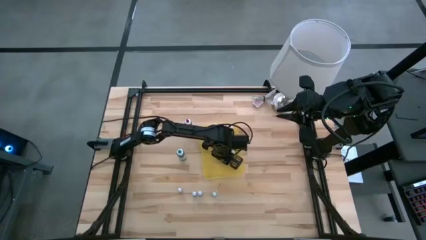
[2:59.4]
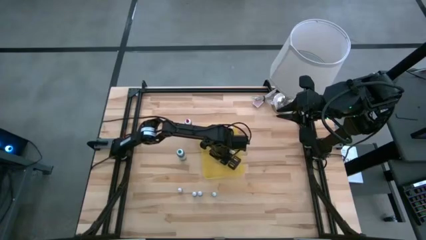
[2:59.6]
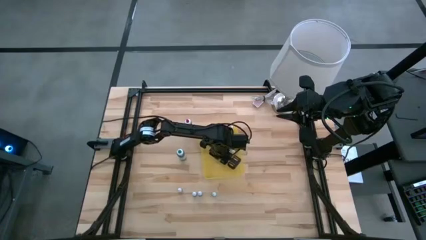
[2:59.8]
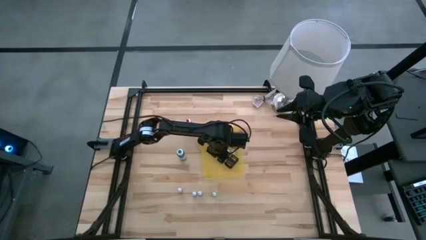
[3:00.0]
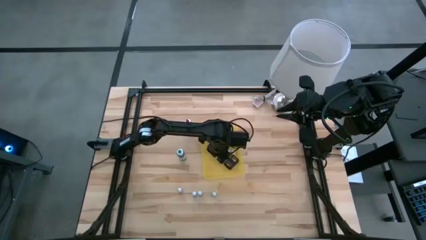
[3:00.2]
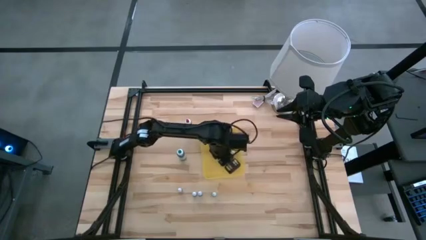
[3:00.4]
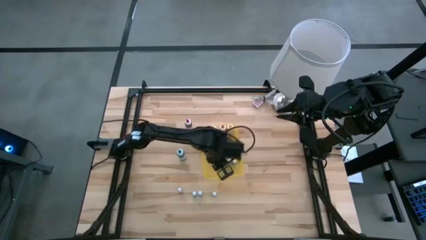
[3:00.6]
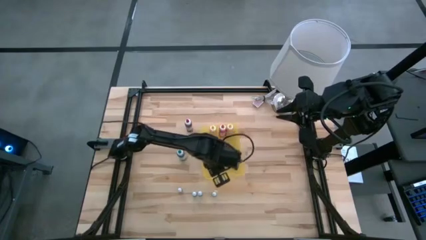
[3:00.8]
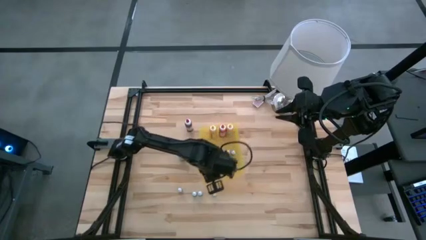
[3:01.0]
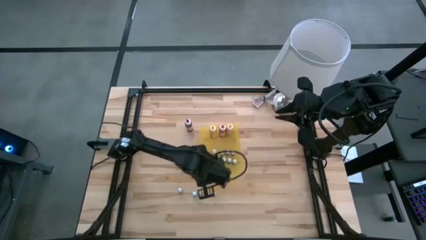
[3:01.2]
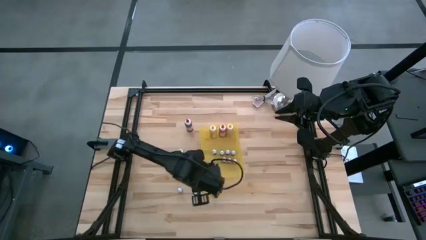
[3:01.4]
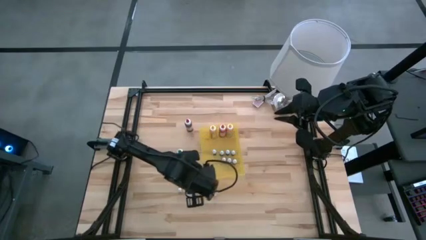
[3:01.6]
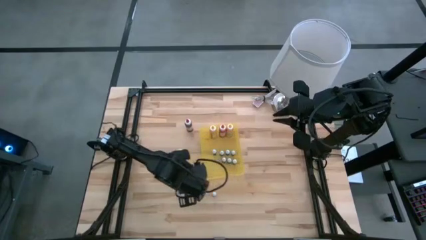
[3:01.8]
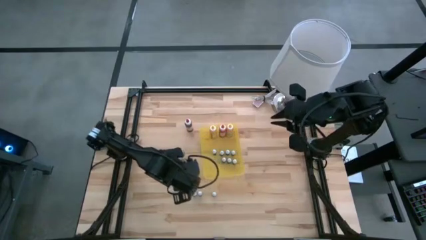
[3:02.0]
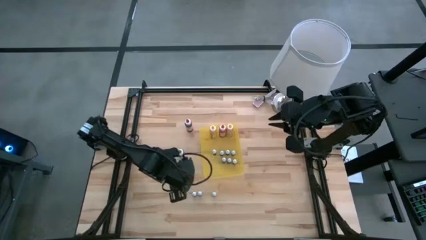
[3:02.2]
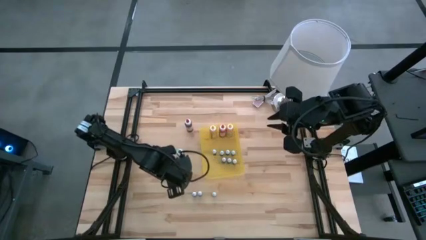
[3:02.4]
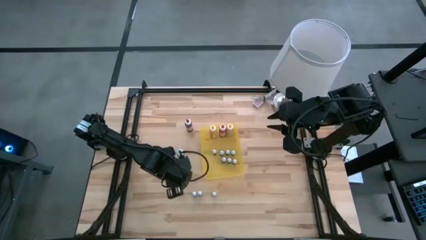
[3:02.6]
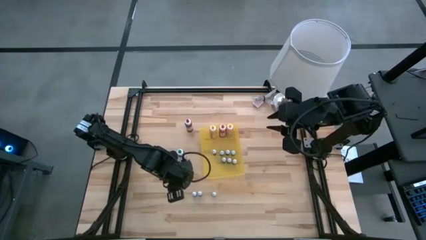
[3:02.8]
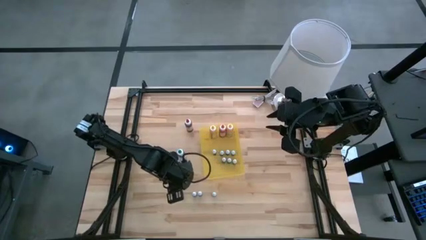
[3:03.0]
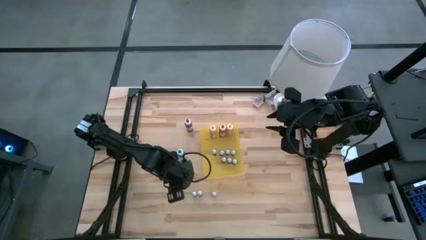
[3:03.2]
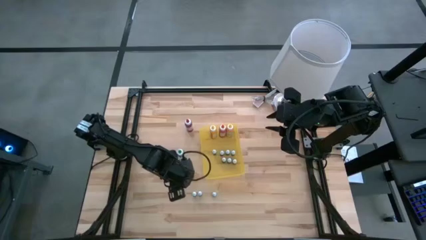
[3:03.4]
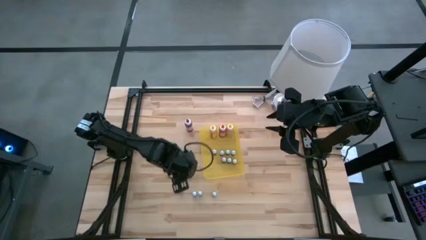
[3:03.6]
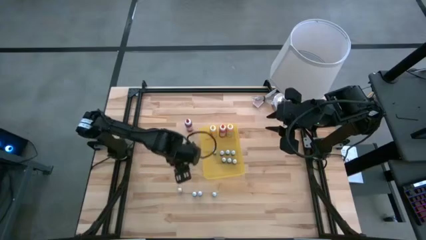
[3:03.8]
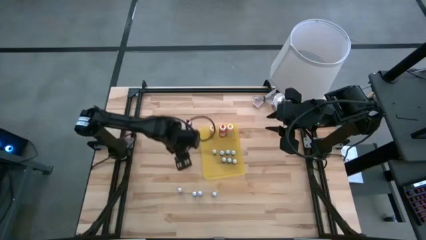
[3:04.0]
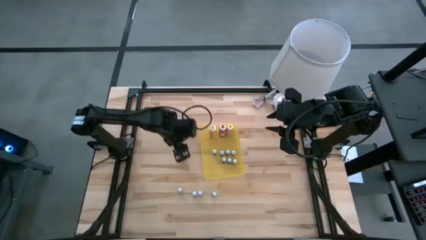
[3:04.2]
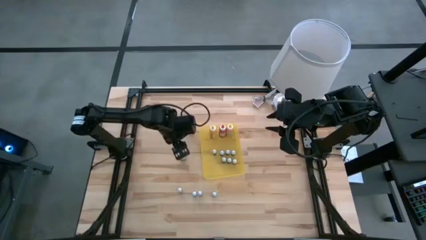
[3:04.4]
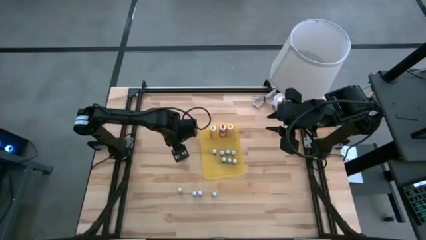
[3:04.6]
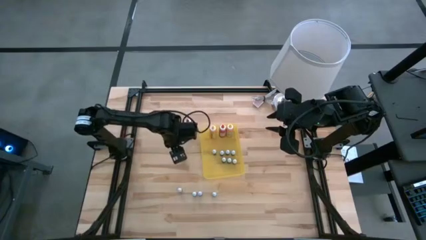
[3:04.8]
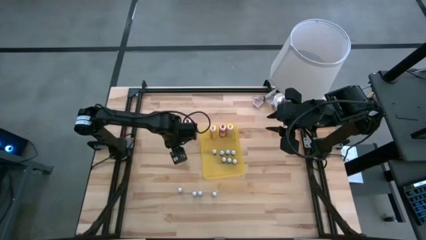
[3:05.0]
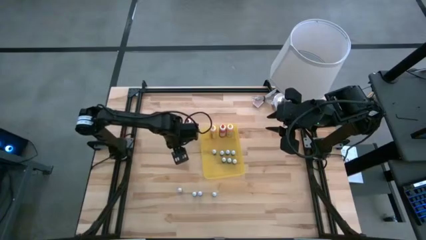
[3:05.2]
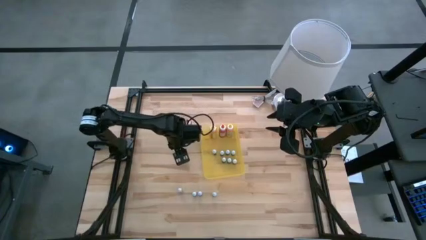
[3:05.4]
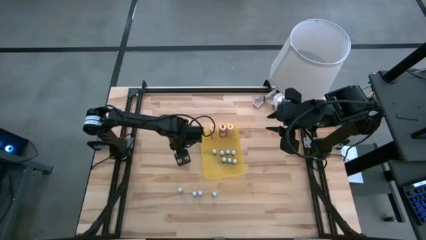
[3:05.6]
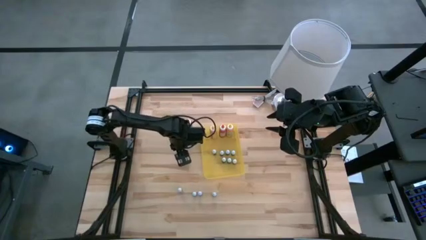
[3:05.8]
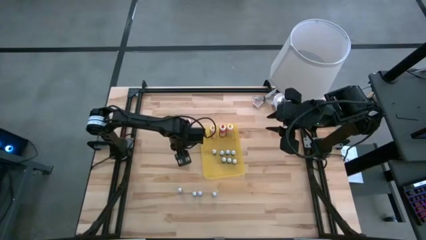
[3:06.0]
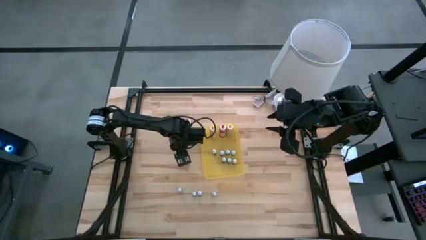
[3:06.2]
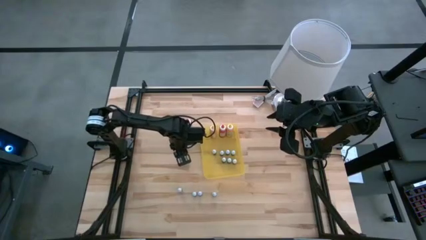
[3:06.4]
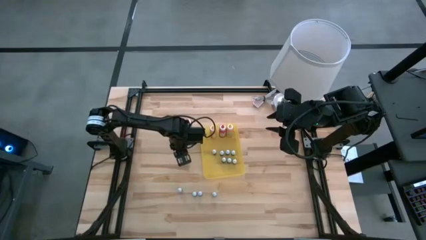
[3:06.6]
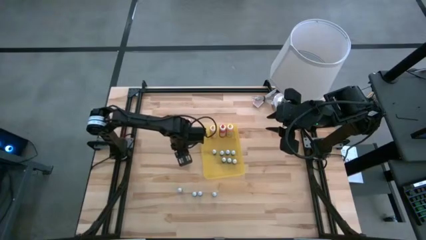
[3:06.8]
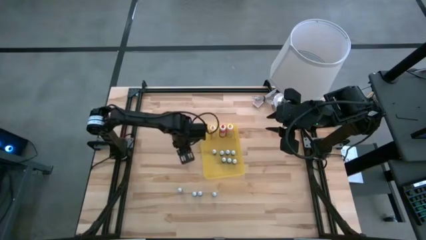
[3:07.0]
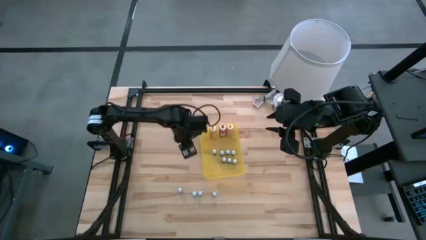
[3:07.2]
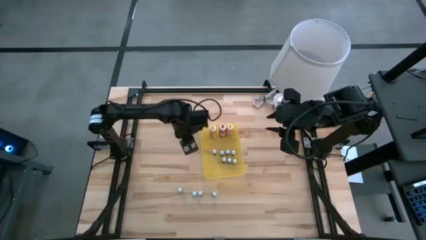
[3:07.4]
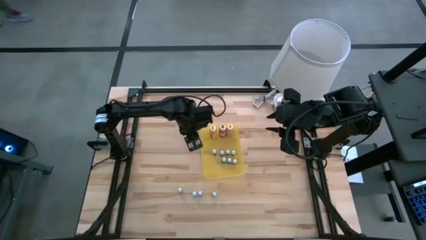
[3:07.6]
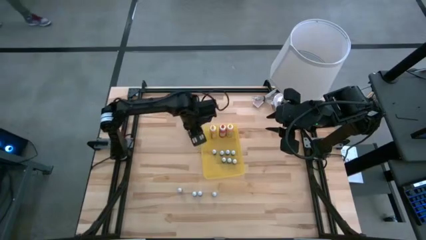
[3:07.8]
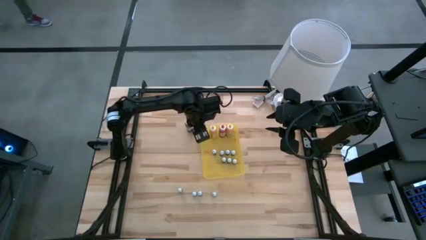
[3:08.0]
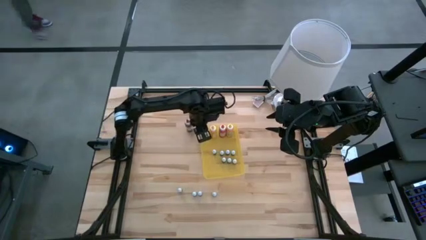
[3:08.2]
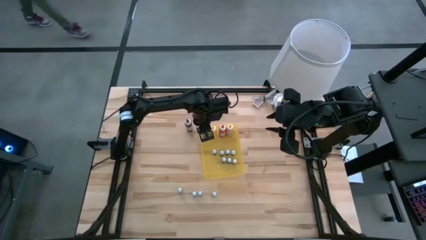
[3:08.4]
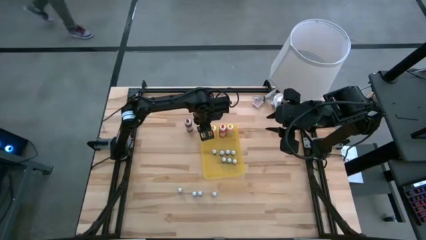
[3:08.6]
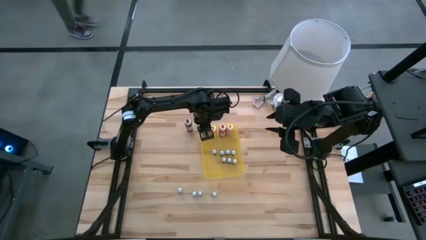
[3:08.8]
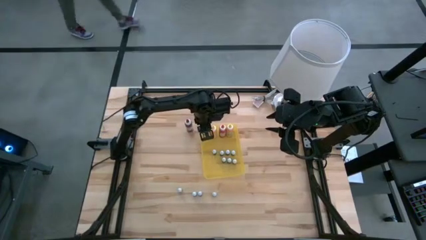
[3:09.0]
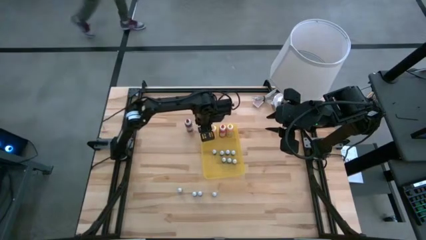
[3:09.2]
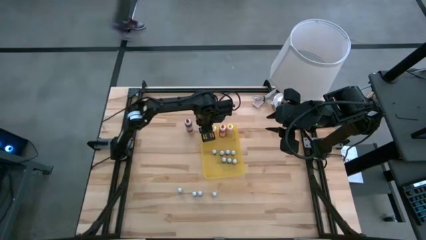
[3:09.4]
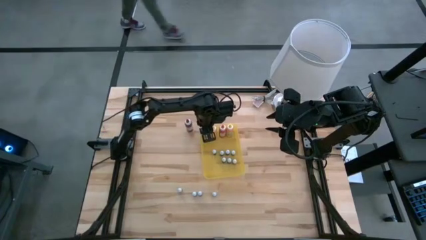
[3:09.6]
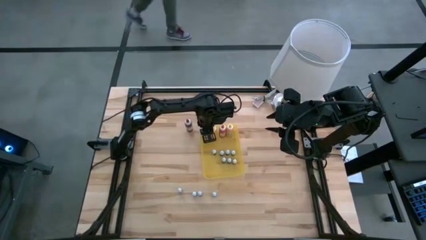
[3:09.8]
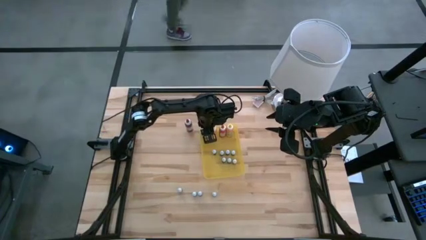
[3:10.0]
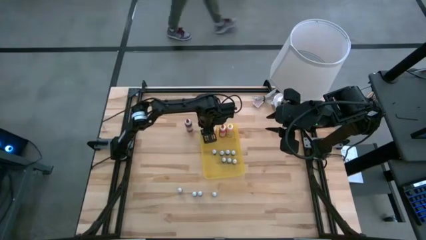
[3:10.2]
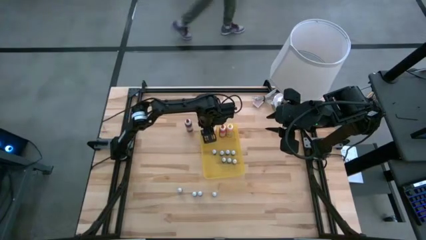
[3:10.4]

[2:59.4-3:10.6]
Task: Pick & Place food coloring
Put the large green food coloring bottle into the bin

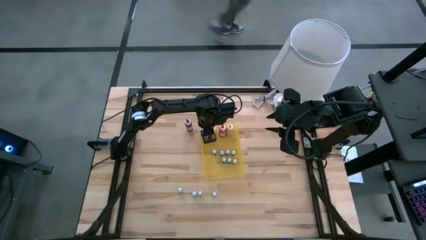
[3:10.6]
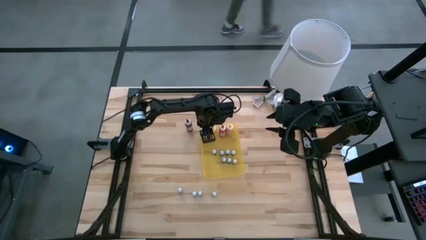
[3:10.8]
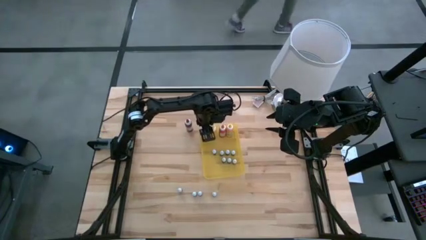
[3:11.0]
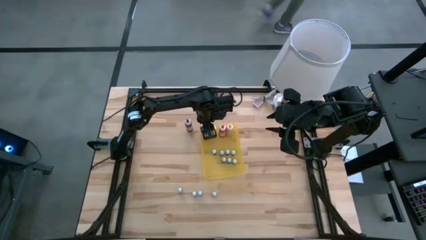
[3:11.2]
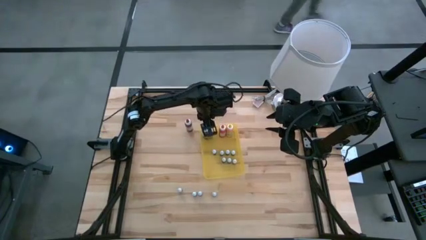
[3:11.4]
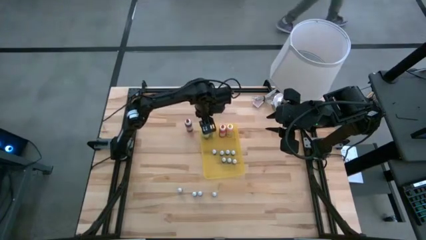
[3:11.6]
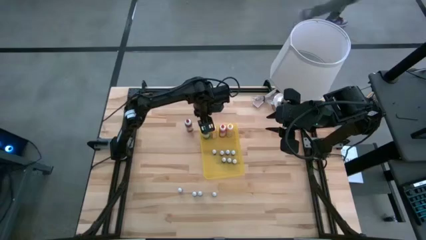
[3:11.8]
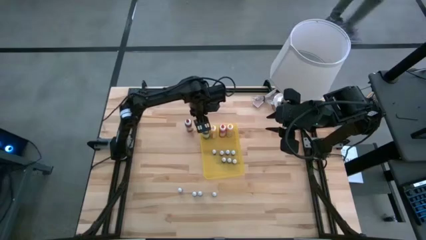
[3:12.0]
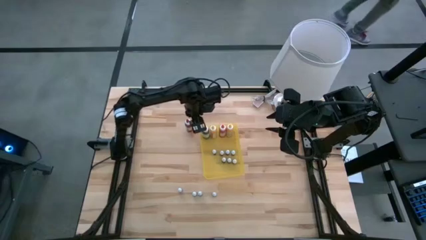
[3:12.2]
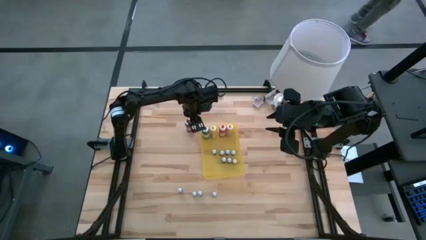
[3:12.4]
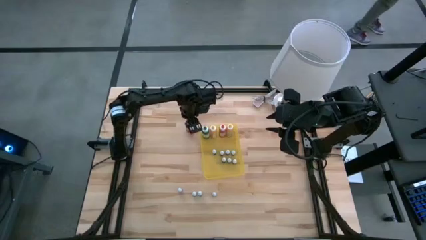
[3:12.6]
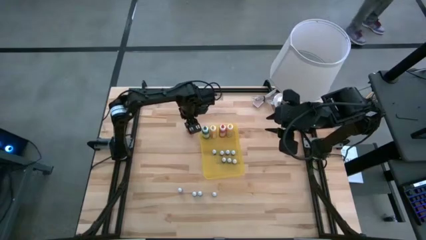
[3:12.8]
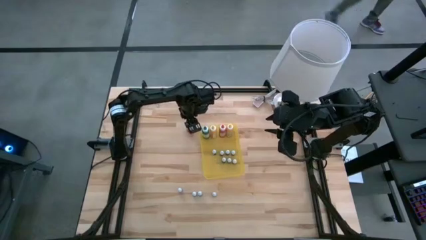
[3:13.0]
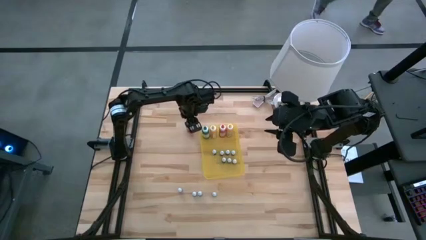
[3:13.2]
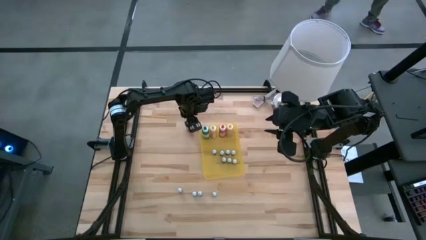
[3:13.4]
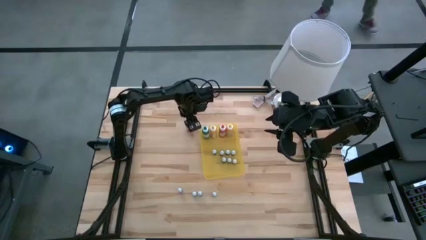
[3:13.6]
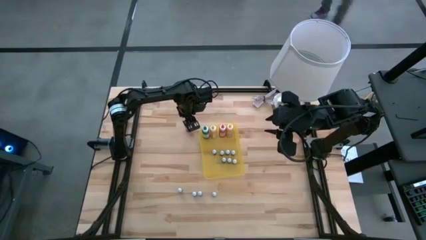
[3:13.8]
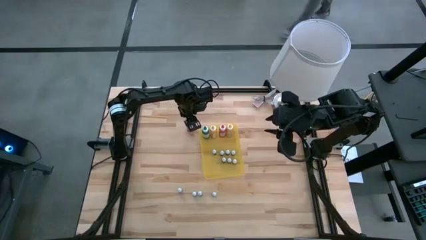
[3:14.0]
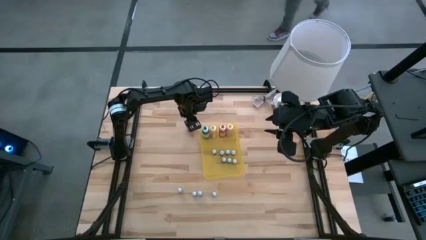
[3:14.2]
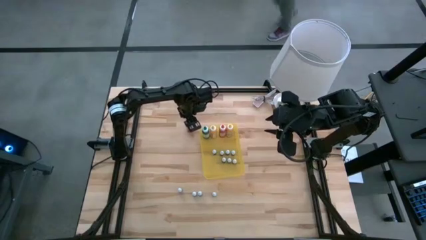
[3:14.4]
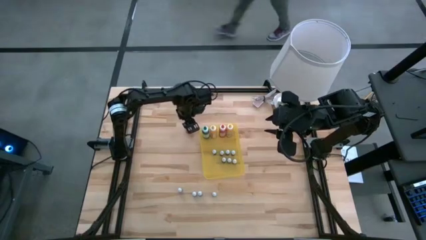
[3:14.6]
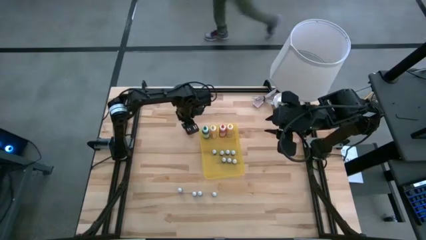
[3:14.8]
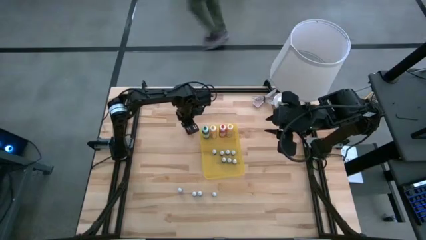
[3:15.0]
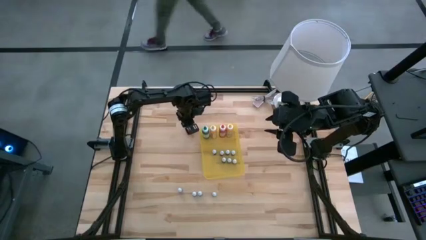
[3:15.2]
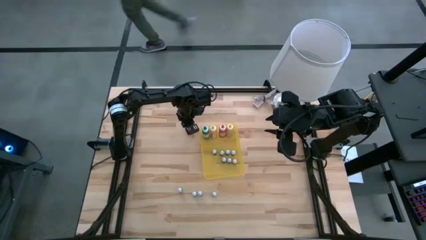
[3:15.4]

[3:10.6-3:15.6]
Put the large red food coloring bottle into the bin
